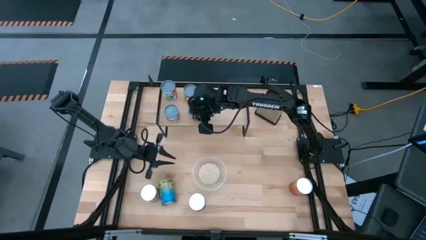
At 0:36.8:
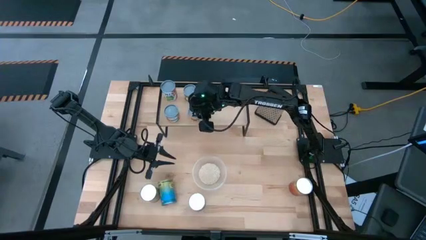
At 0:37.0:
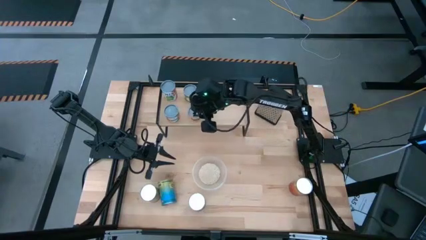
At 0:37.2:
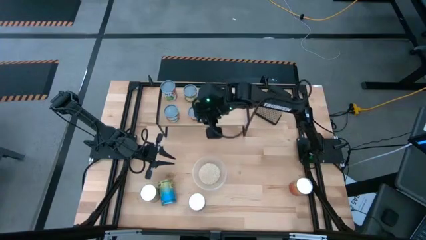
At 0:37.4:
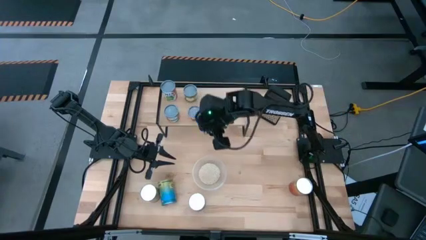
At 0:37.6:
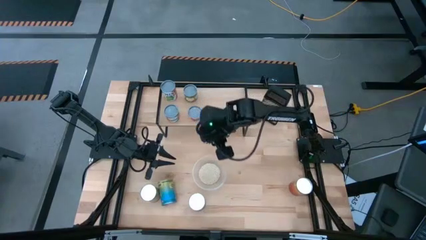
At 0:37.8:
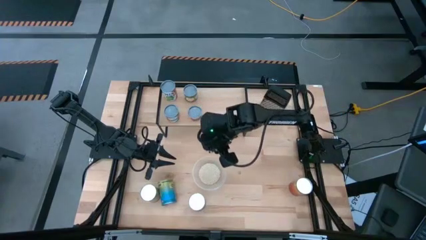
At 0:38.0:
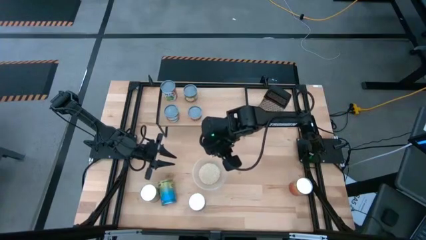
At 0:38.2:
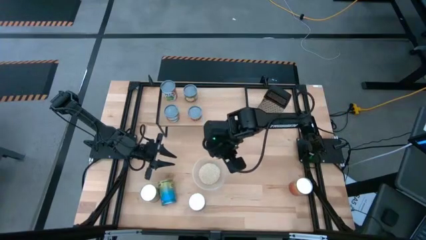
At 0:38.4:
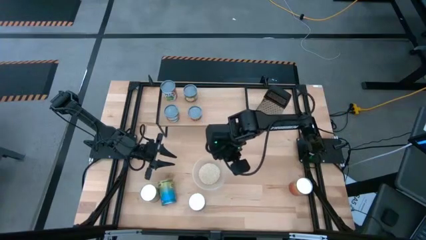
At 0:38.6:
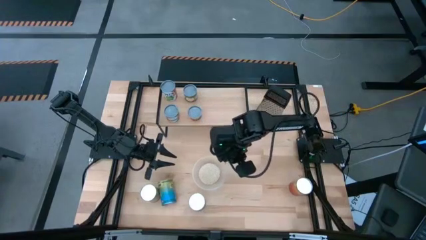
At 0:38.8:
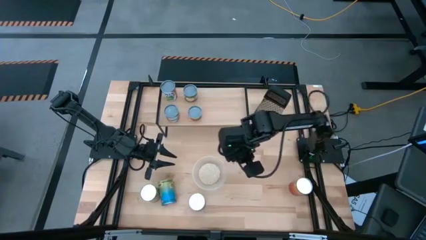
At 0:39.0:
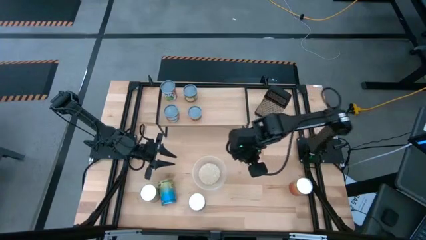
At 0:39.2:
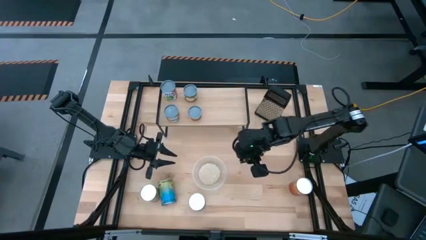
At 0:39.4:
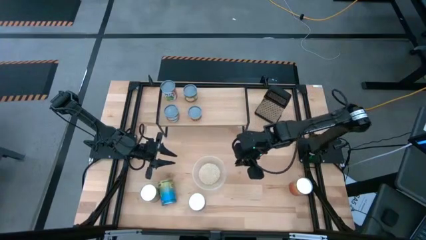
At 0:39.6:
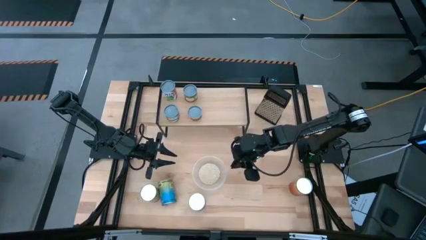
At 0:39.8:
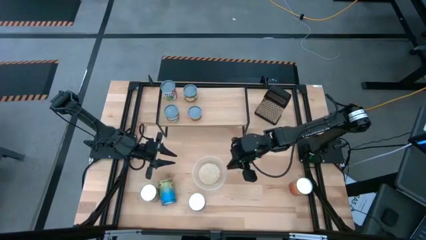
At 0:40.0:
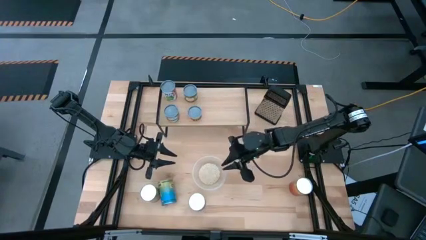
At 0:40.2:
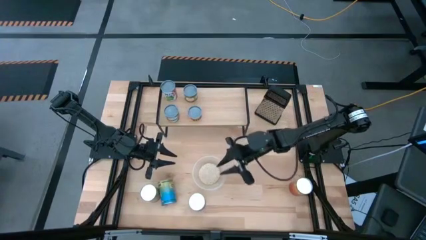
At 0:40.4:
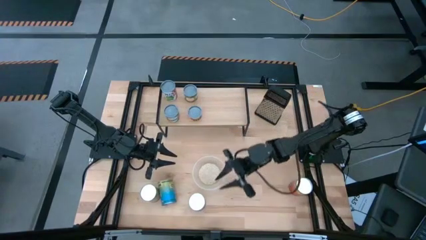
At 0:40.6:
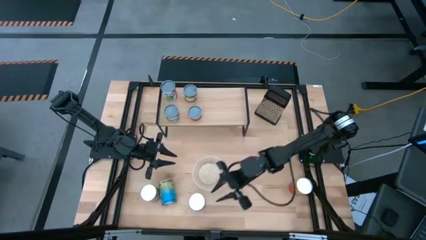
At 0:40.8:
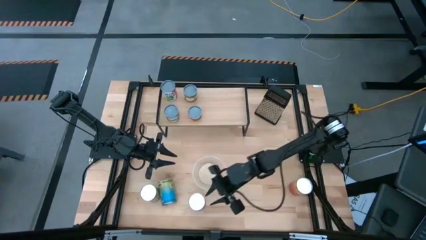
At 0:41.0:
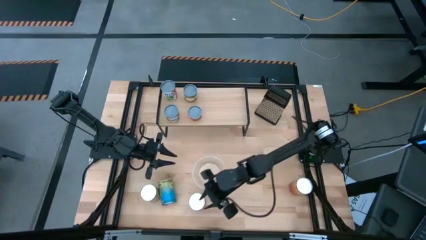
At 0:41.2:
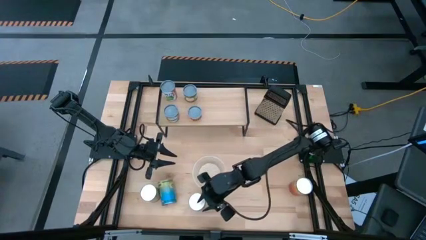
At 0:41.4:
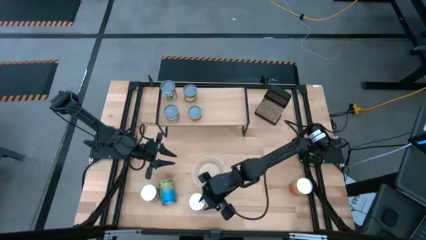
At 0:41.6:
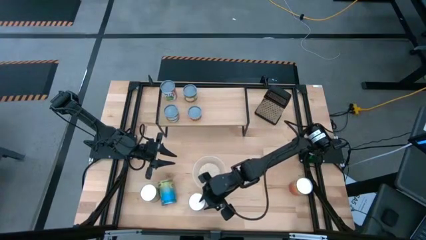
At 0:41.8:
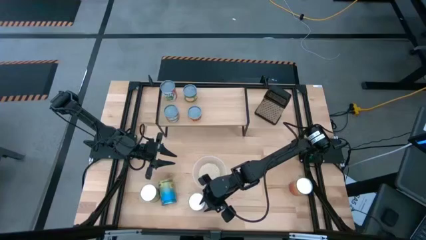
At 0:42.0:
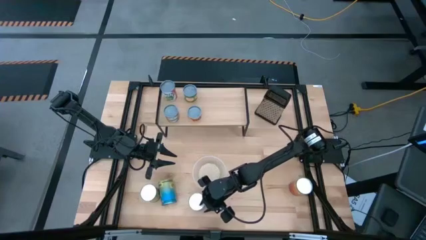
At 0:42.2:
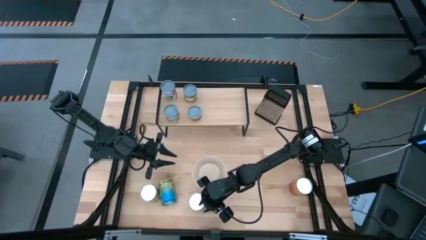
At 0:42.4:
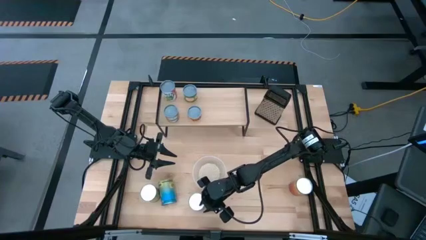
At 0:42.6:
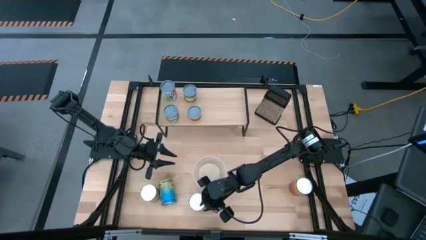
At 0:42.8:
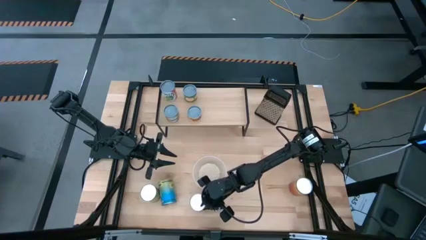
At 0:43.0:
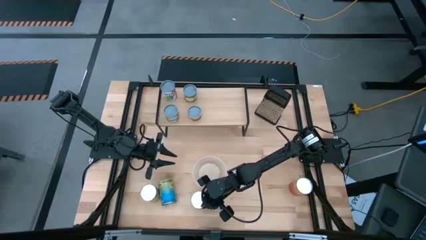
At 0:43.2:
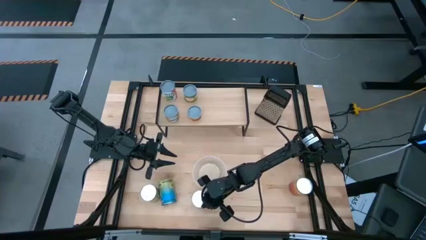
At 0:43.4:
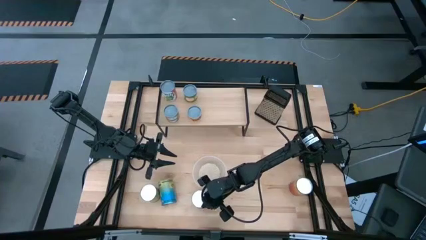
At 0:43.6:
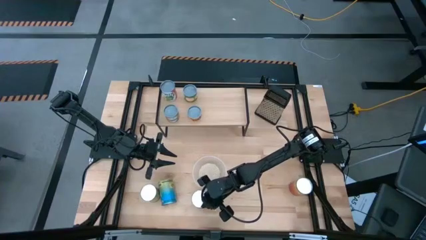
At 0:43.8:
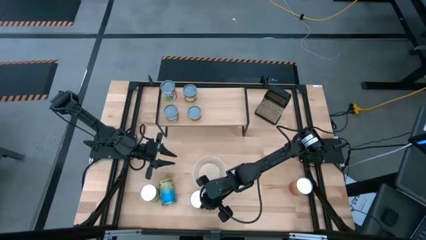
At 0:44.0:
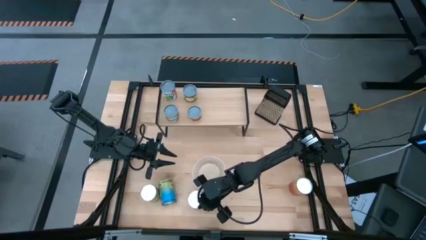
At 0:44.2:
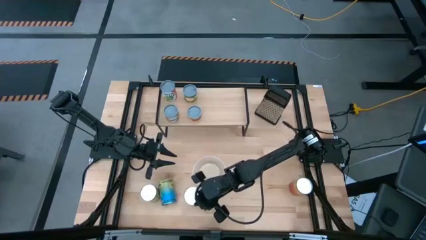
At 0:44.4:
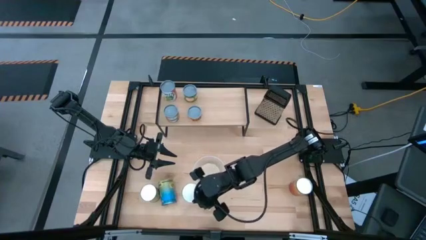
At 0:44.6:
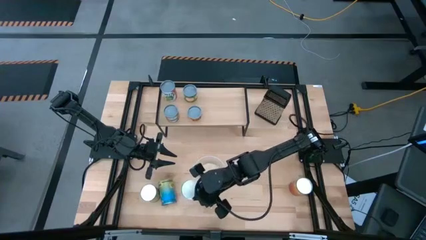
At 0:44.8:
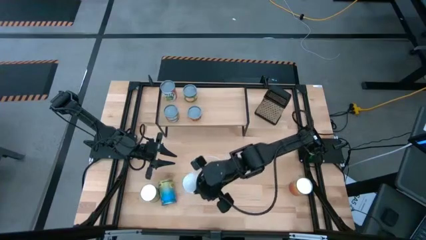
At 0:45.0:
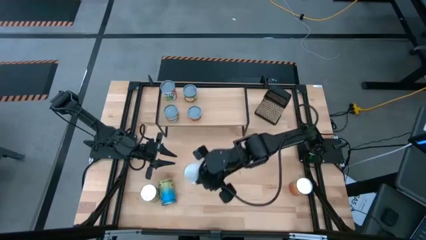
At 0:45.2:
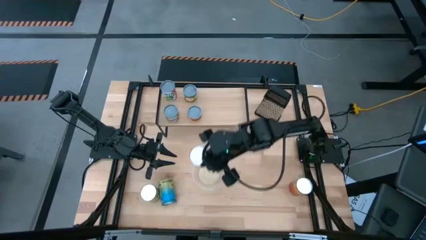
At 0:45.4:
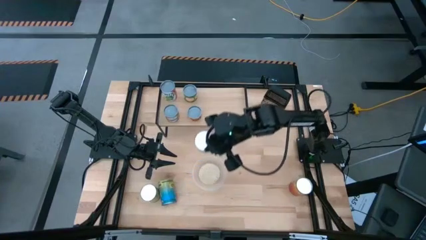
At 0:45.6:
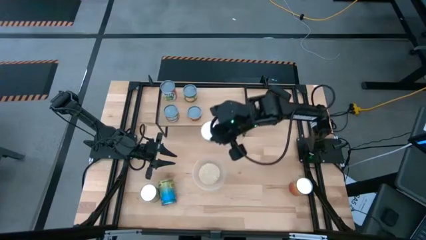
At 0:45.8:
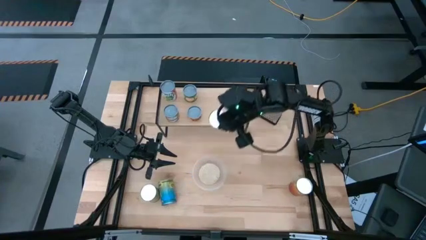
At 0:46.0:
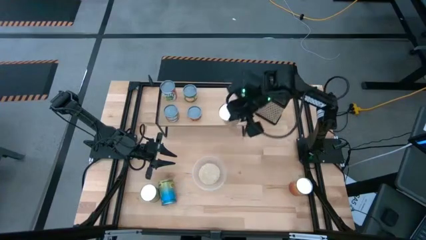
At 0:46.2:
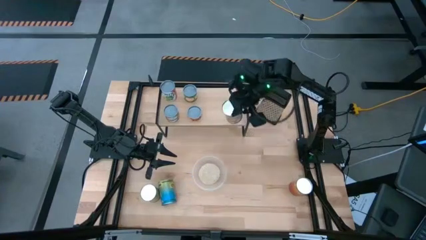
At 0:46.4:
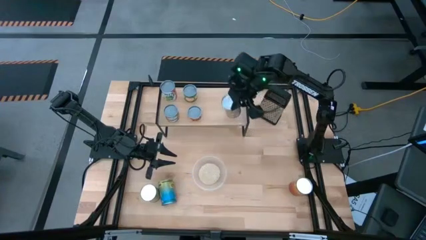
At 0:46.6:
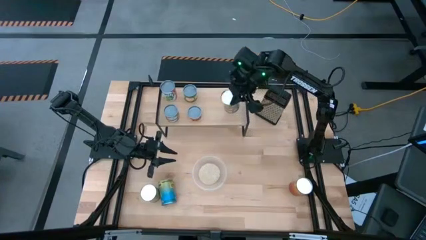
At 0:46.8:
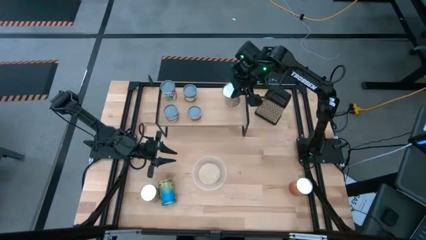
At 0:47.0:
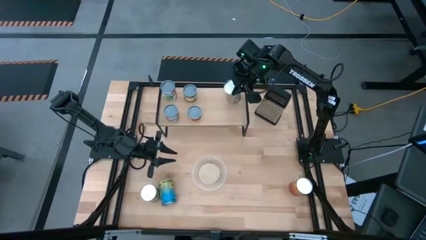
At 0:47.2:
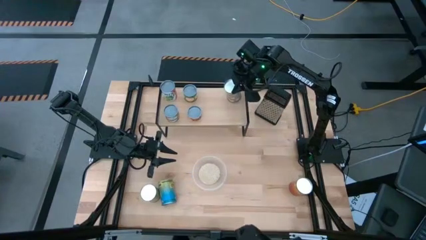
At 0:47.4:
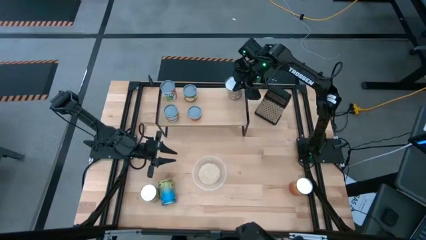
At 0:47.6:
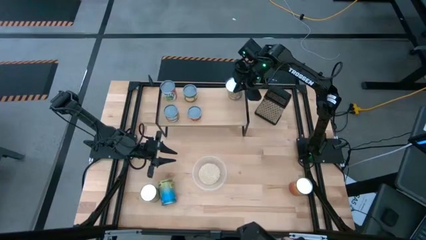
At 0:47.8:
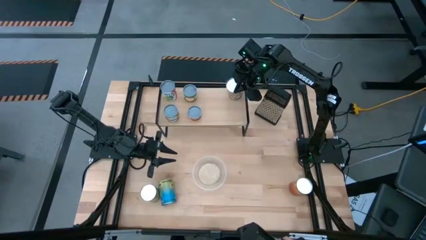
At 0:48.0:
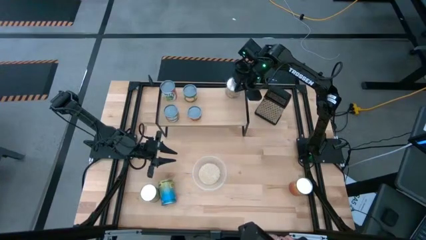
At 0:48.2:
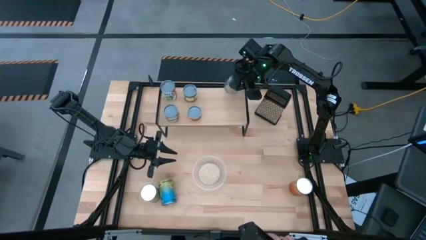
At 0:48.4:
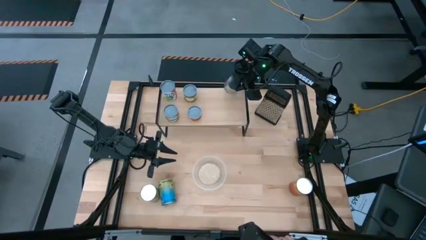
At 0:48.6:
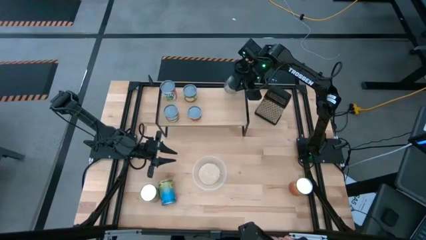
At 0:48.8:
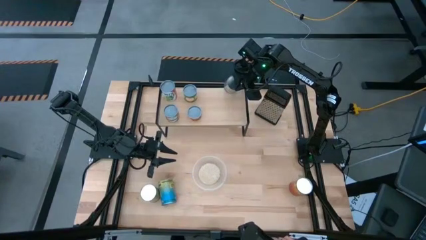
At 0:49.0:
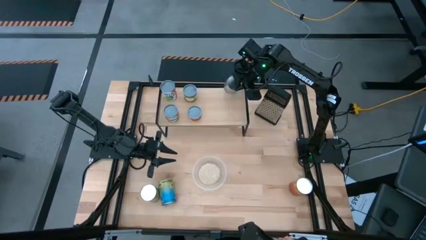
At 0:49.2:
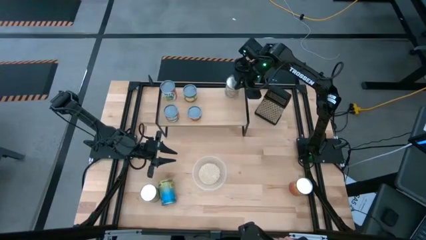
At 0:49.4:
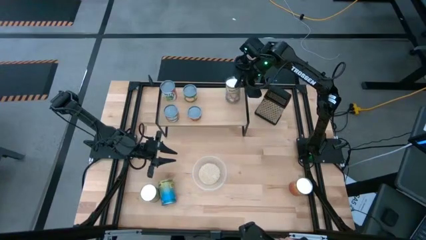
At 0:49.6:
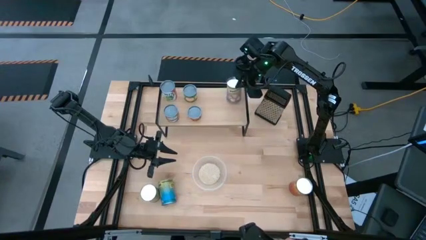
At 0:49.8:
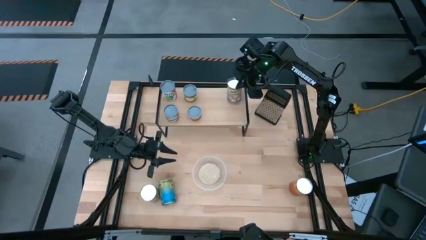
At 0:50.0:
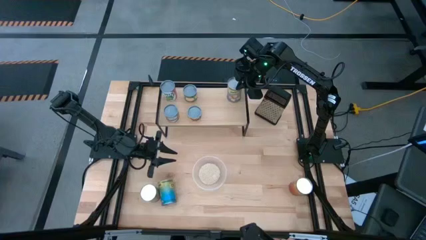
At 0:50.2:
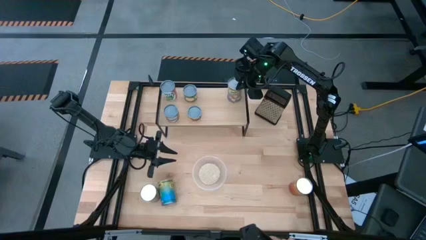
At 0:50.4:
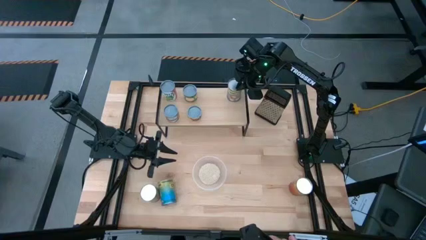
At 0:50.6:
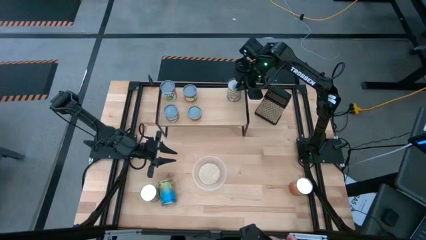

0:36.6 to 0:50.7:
Task: Pick and place cans onto a shelf
Put the canned peaches on the shelf
